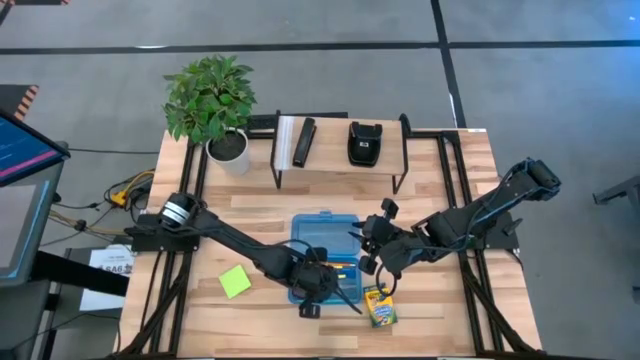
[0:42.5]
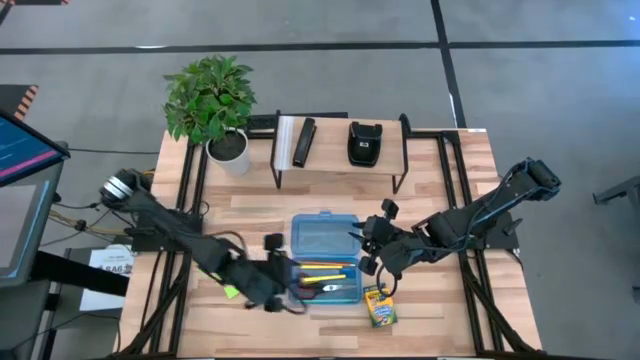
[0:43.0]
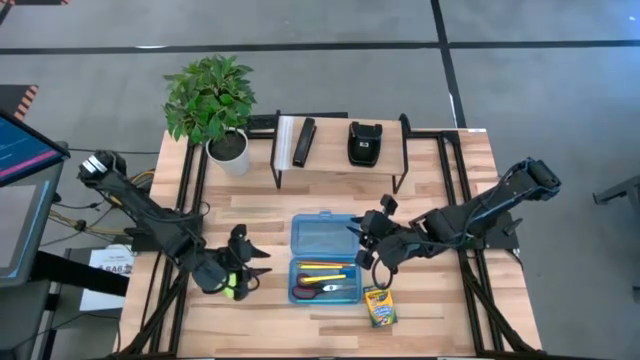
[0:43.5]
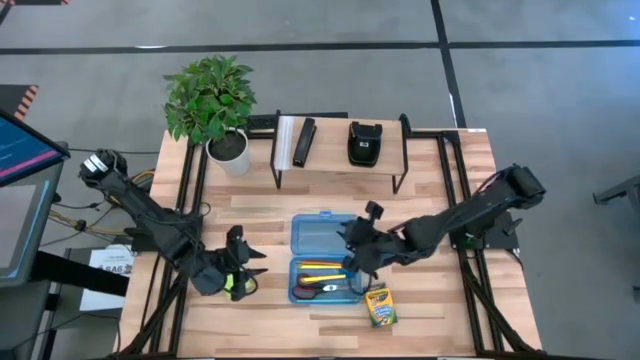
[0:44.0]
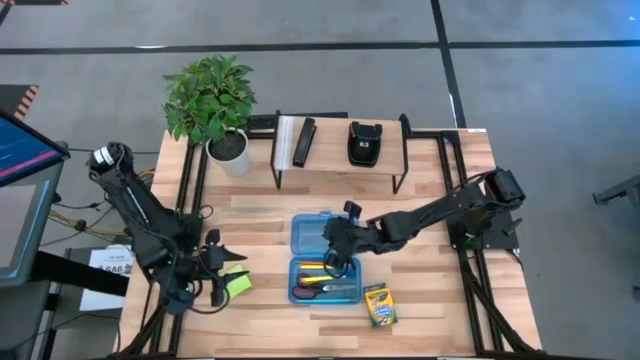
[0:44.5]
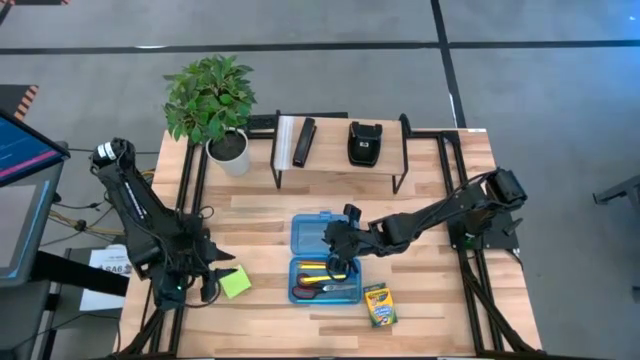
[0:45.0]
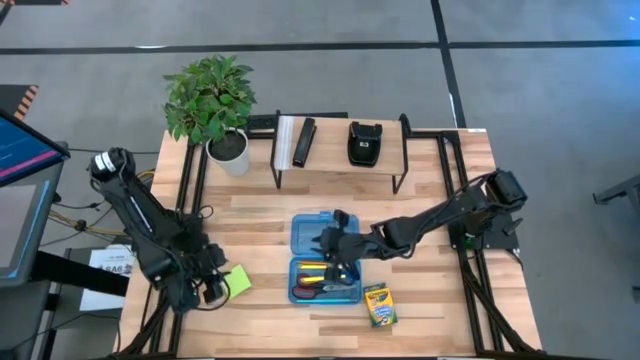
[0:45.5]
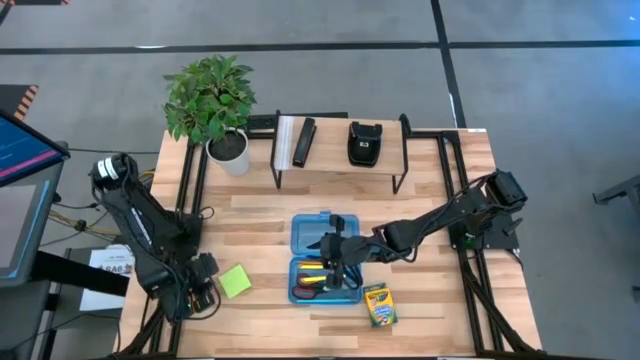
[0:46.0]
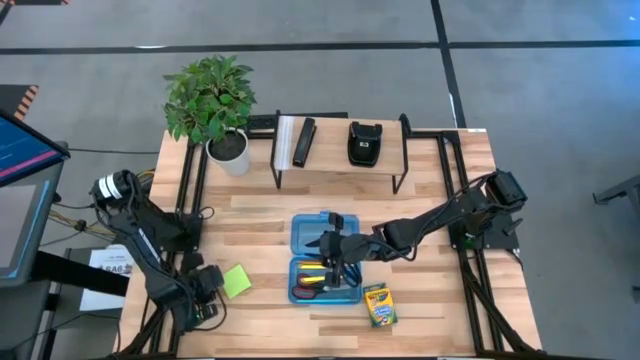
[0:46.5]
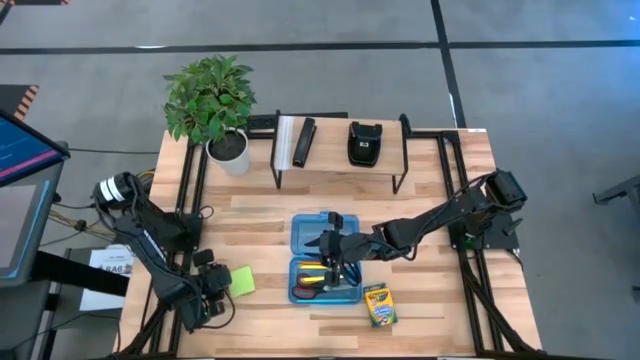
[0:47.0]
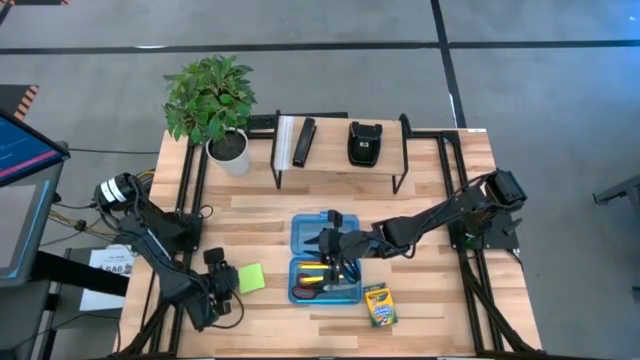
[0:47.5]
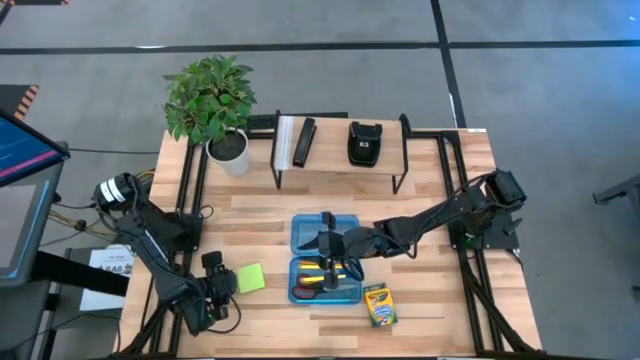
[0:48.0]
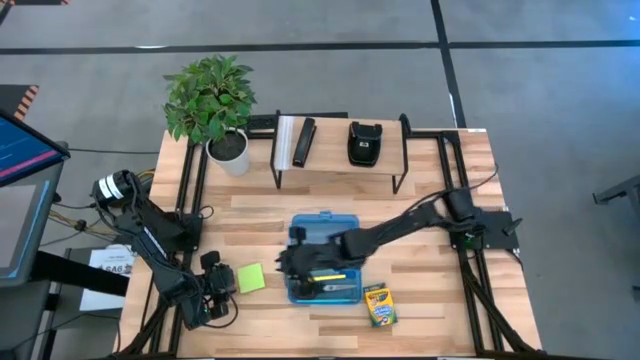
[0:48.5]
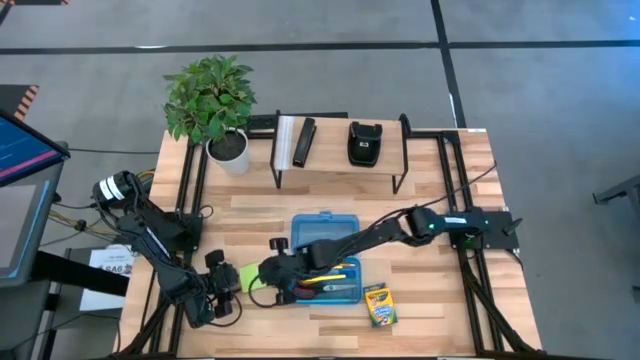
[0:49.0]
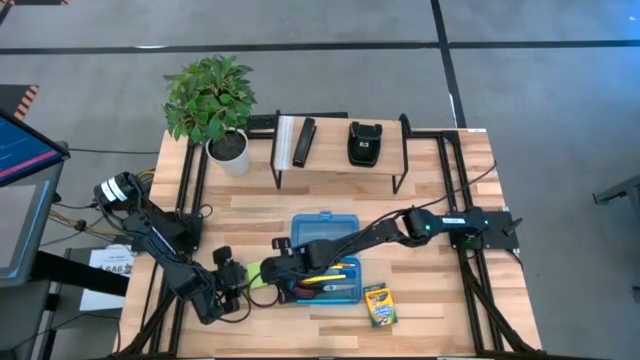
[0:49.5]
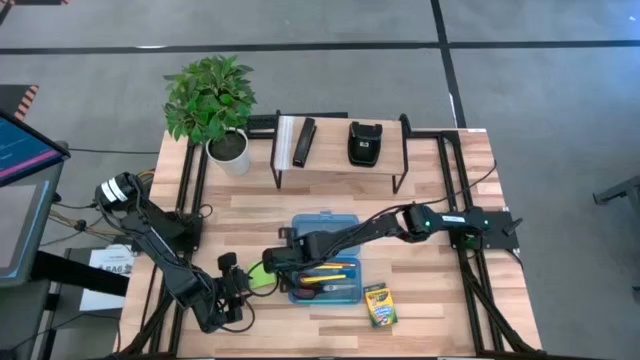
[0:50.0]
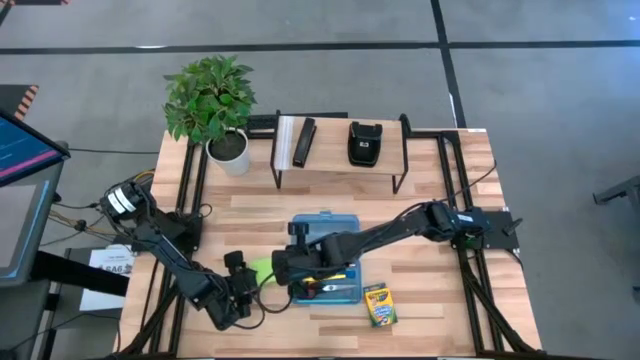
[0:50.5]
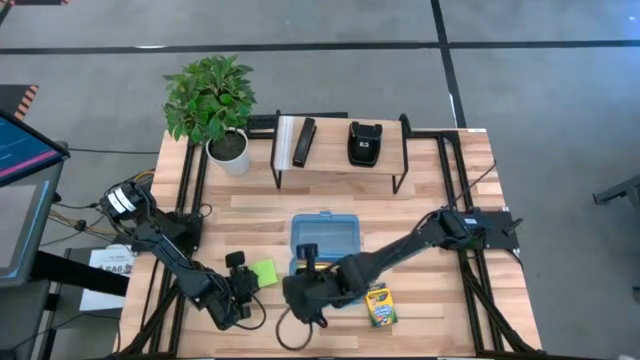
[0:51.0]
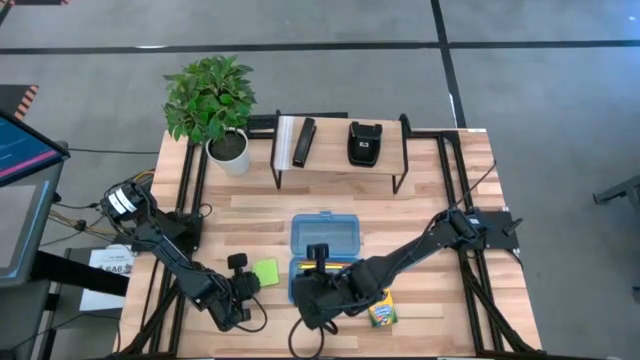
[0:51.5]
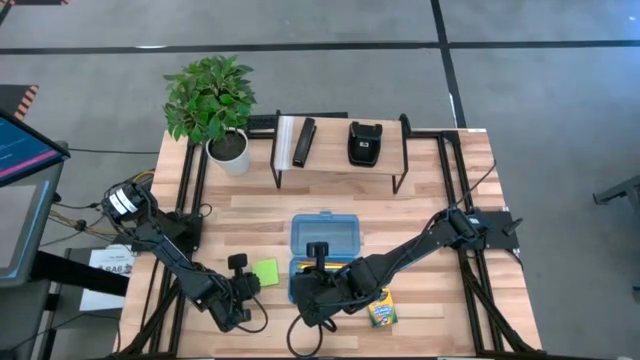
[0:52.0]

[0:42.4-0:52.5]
Task: Pack school essentials
Put the sticky note into the supply box

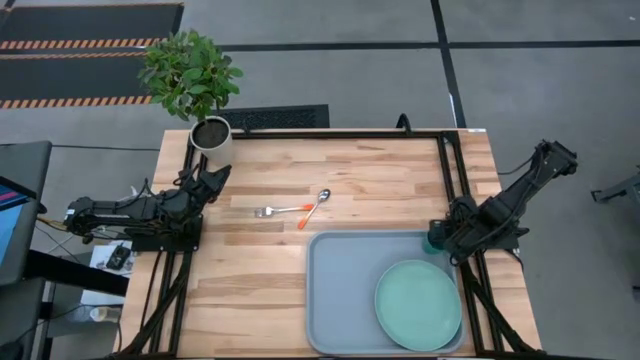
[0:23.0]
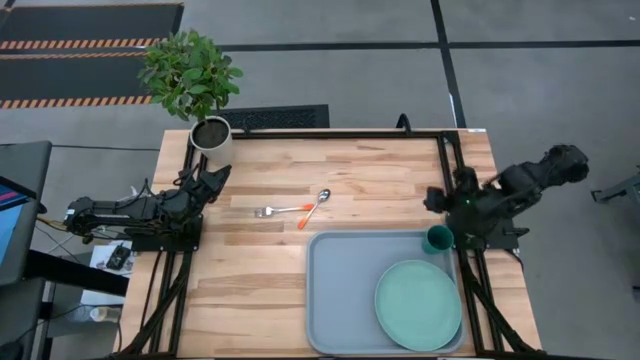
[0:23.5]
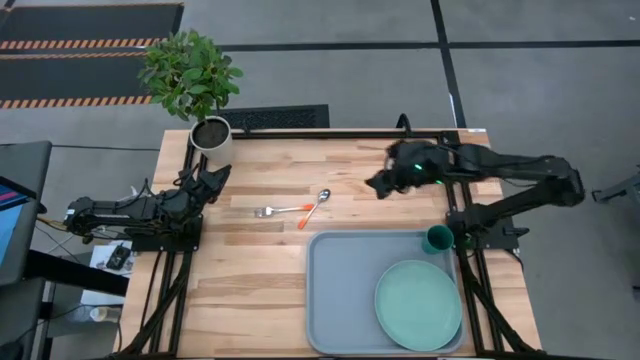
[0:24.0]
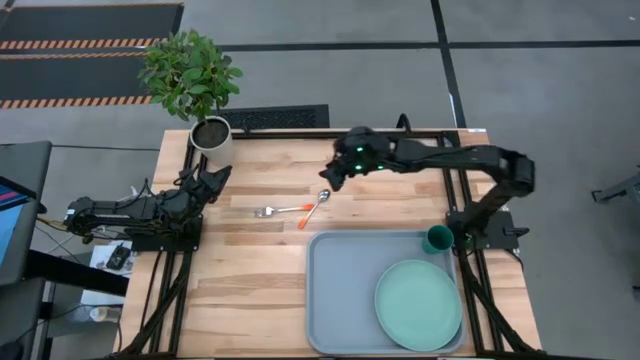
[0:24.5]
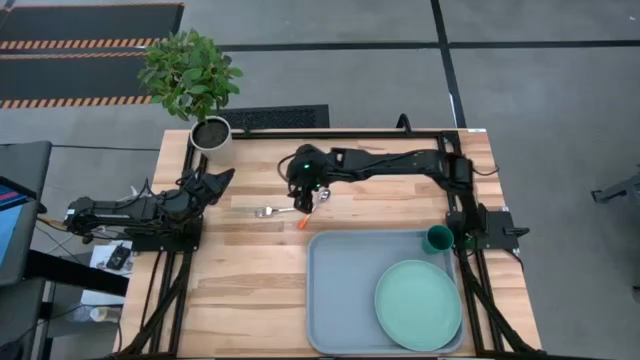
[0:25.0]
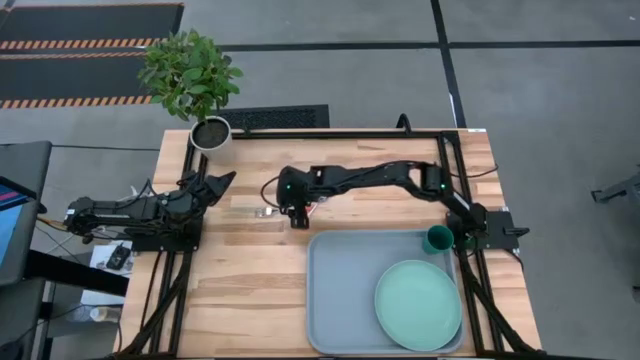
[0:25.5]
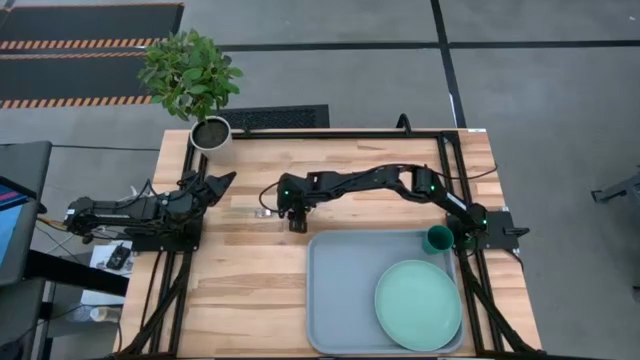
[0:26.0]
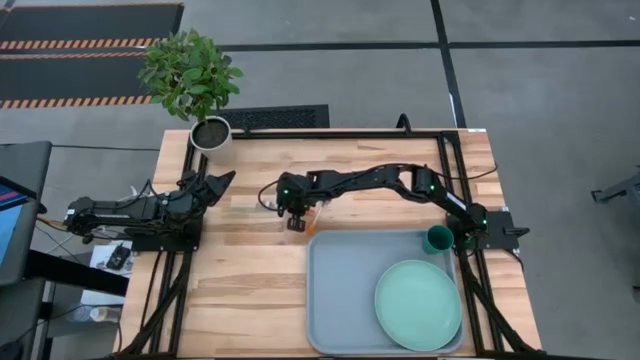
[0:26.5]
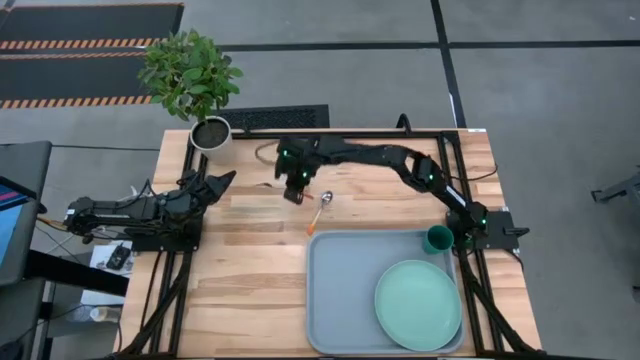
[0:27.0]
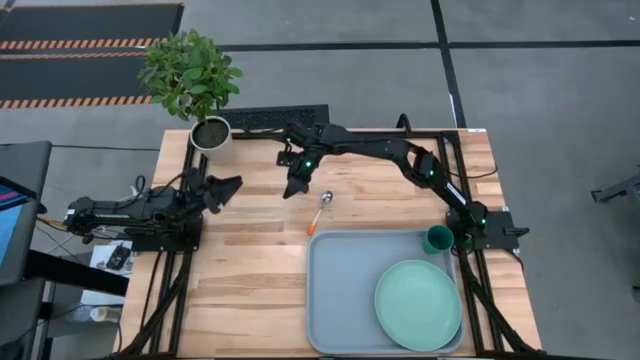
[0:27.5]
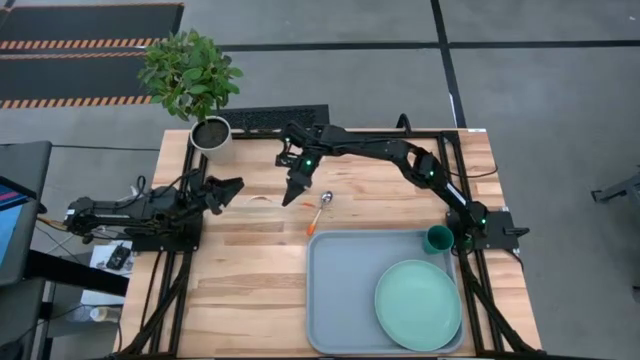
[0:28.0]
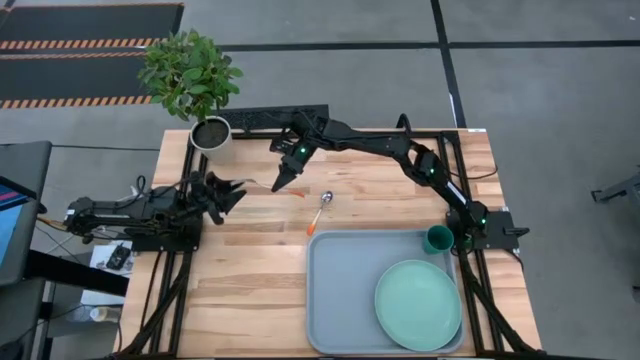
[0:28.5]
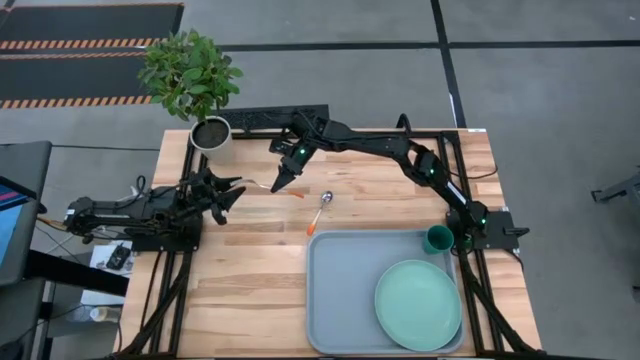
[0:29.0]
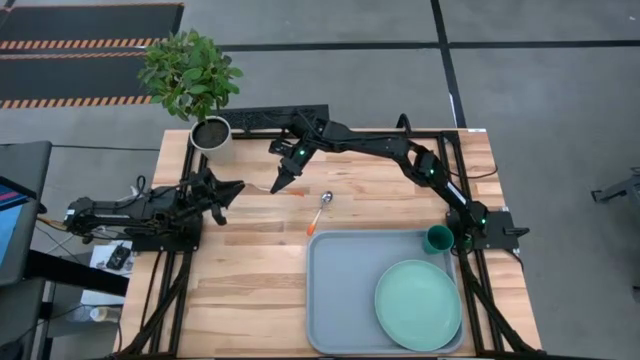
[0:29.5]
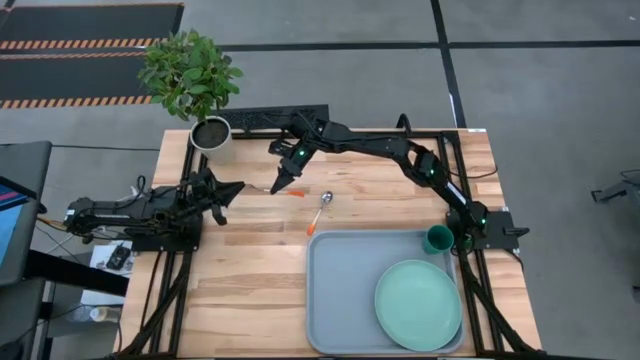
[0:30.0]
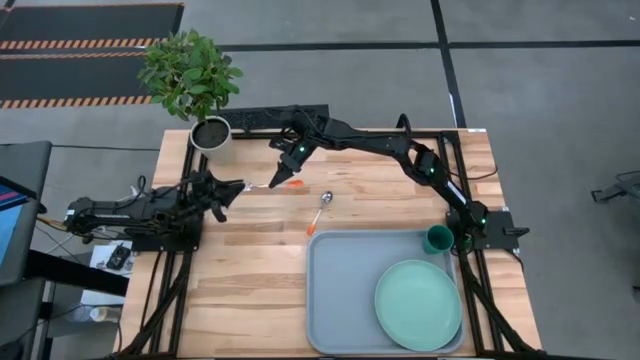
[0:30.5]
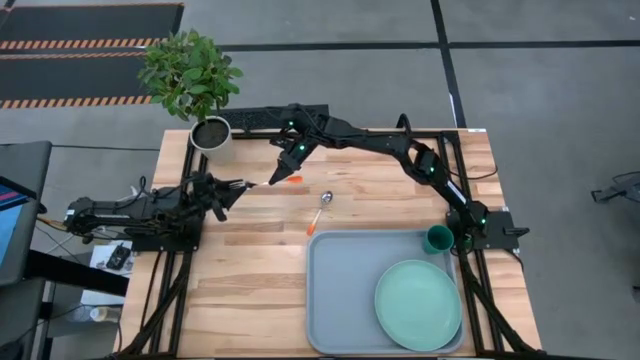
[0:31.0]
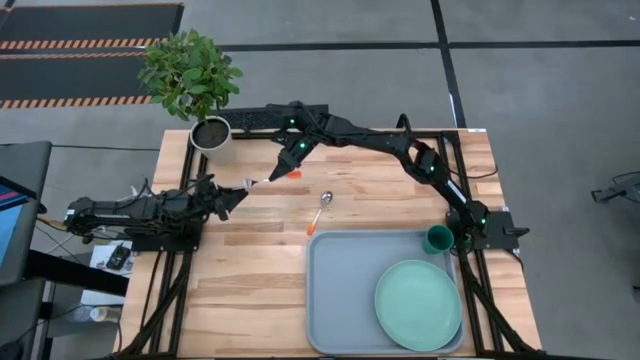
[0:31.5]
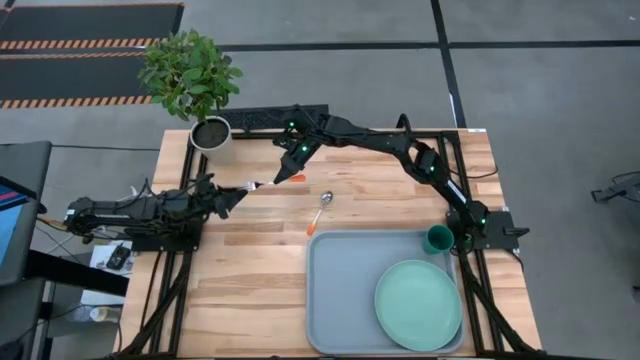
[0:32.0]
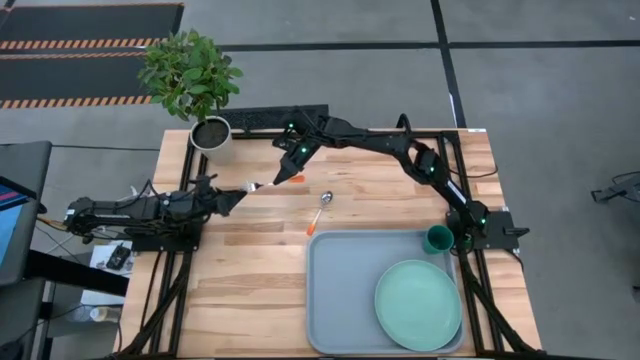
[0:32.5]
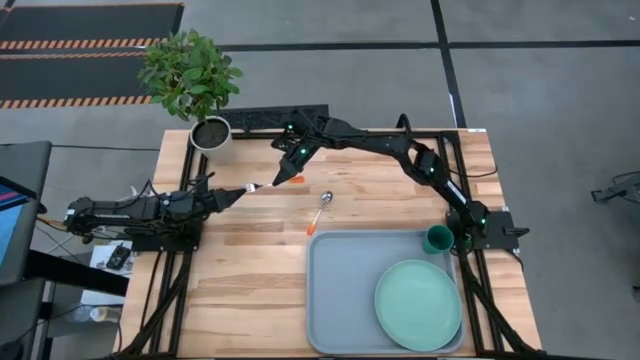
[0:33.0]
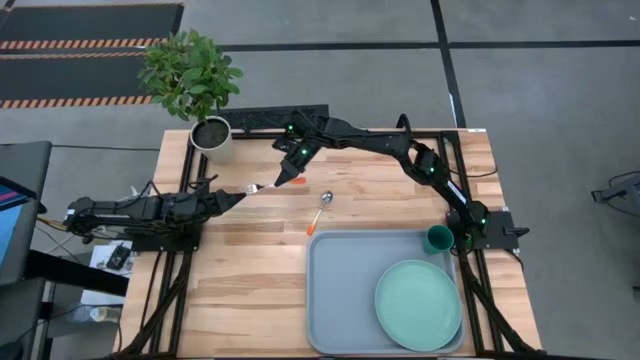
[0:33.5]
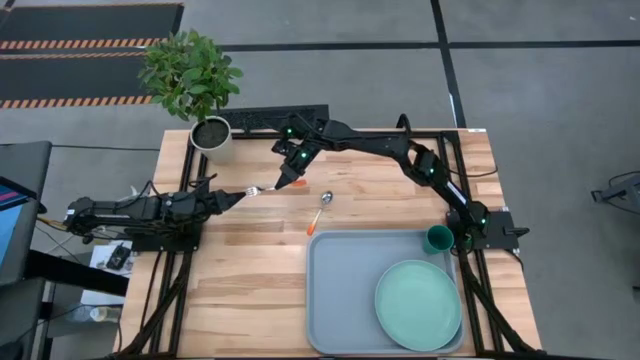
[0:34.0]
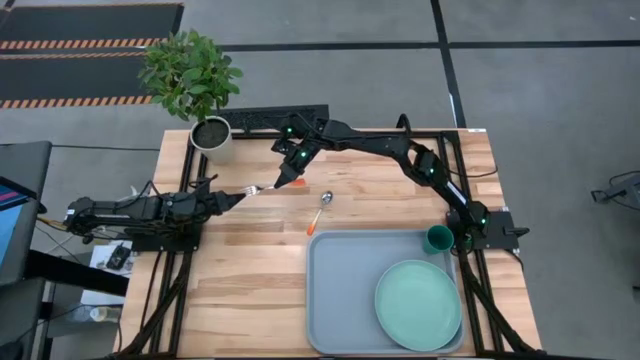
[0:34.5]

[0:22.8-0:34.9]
Task: Pick and place plate/cup/fork/spoon on tray
Put the orange fork on the left of the light blue plate on the blue serving tray
